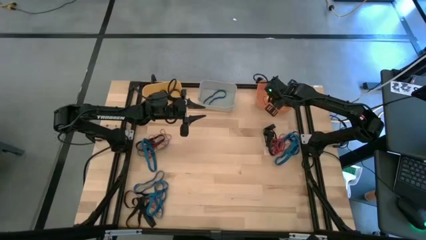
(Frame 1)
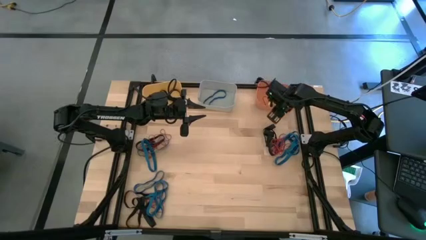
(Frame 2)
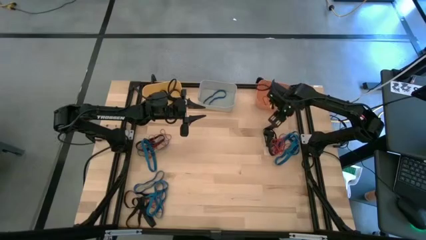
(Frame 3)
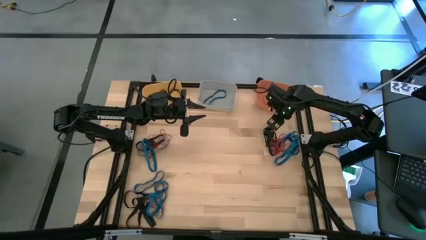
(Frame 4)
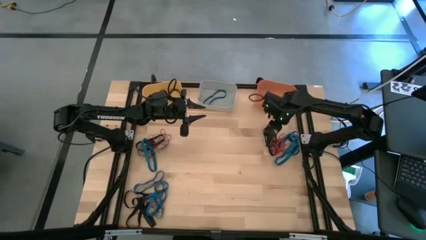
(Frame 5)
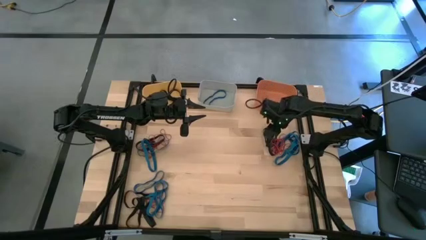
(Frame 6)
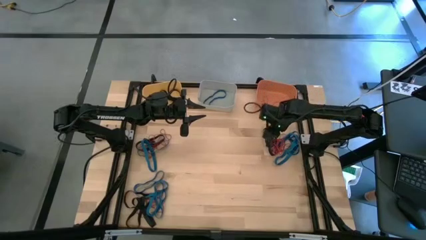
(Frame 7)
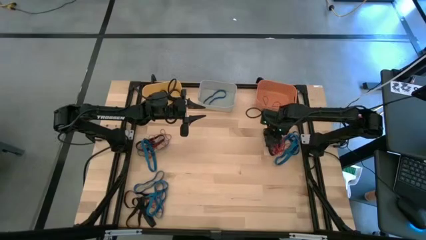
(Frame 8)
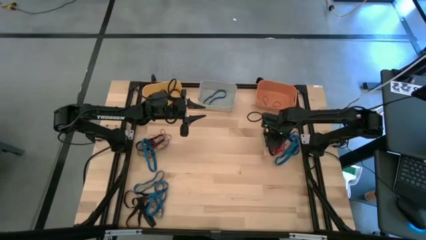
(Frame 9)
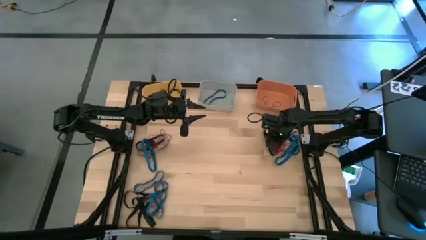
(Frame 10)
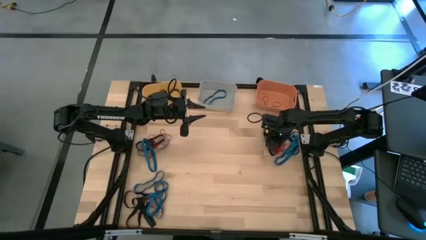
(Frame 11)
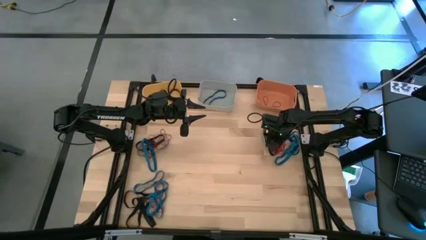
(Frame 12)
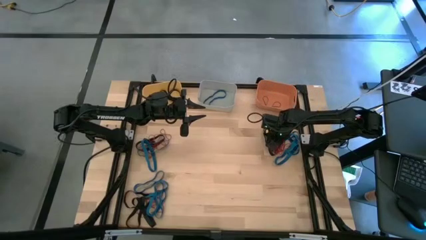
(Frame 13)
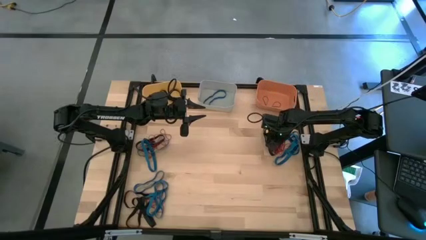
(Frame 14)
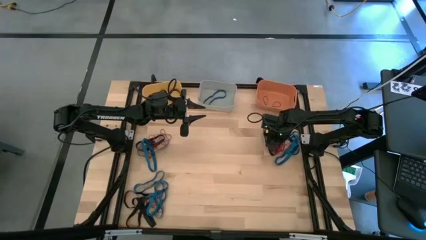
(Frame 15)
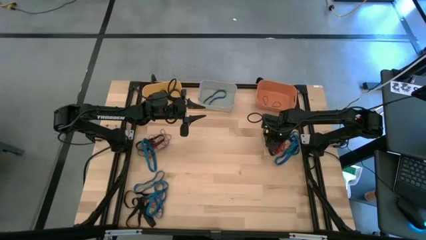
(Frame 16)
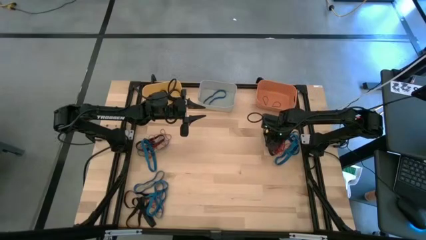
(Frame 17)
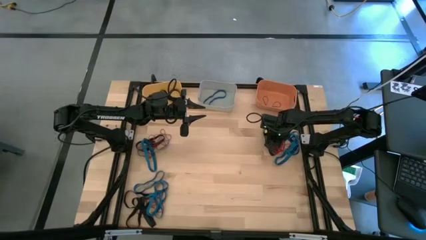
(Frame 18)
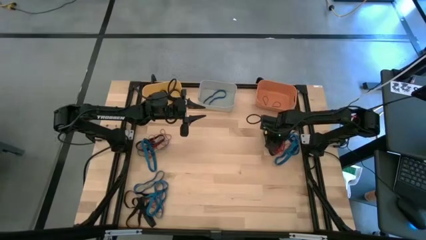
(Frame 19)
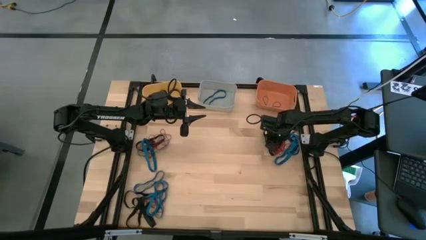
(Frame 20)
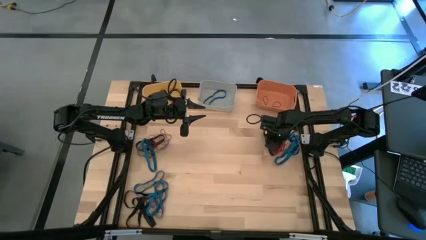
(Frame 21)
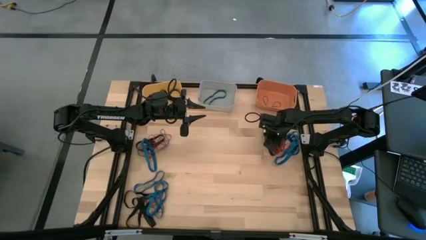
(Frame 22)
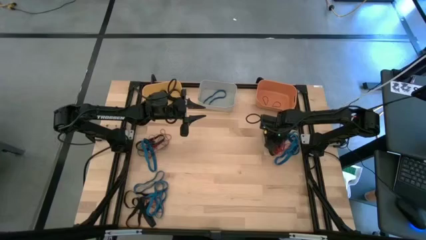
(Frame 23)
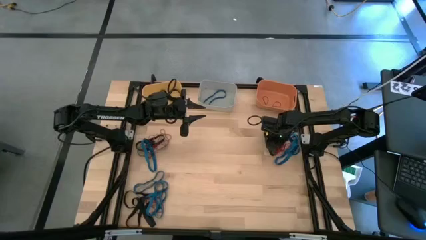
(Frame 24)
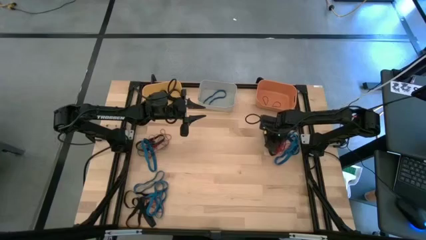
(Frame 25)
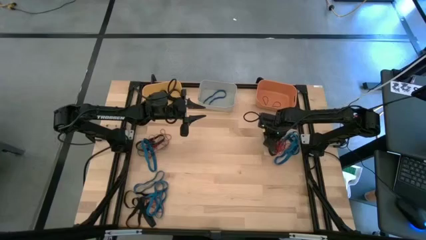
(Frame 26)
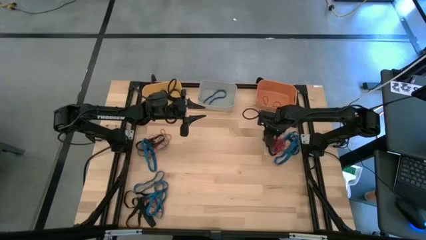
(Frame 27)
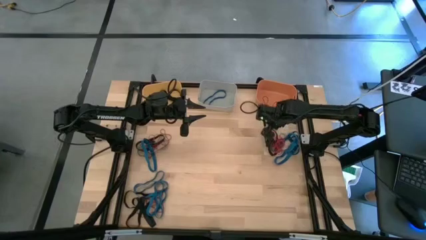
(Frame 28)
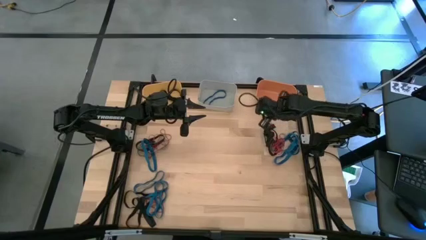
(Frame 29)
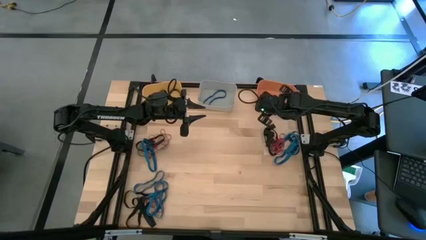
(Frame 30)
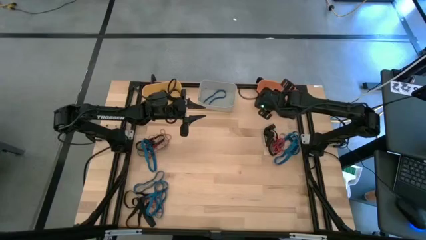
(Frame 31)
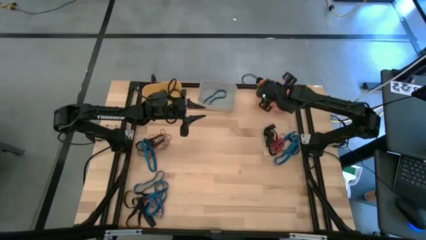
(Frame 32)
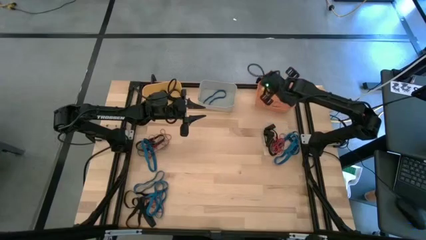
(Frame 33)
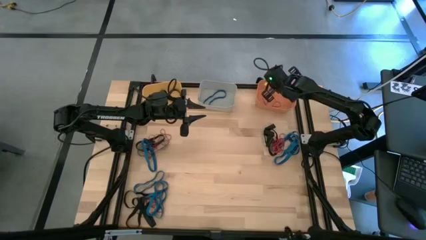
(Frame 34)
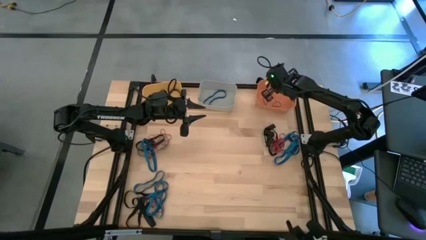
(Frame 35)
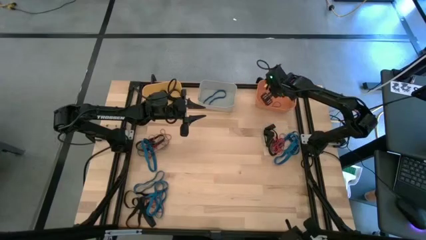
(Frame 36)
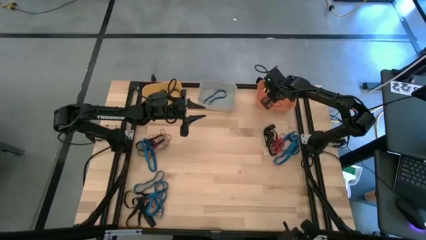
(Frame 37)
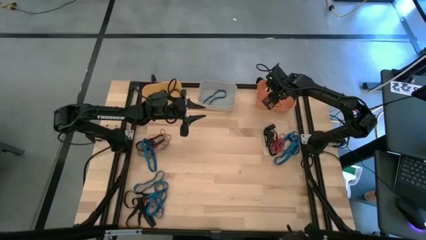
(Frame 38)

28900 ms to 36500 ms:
Task: Sort rubber bands into baskets
Put the red rubber band into the orange bin

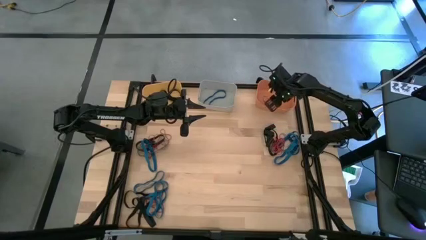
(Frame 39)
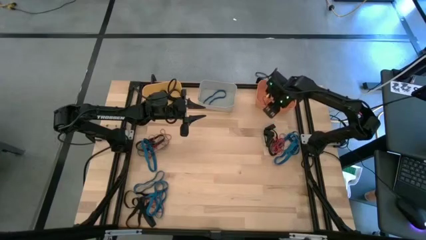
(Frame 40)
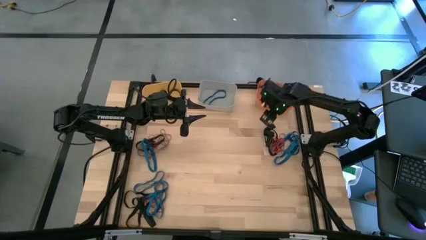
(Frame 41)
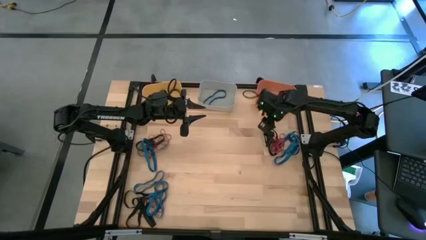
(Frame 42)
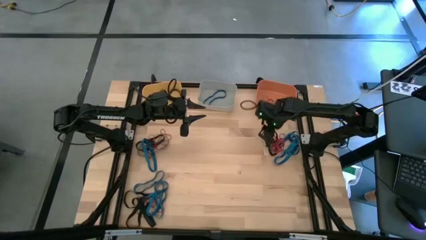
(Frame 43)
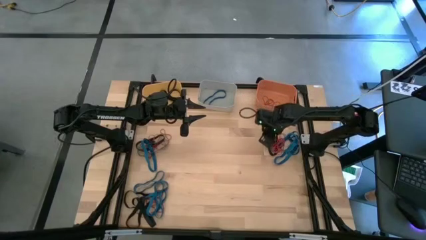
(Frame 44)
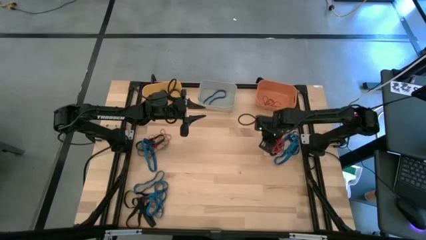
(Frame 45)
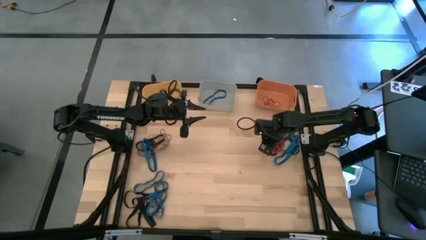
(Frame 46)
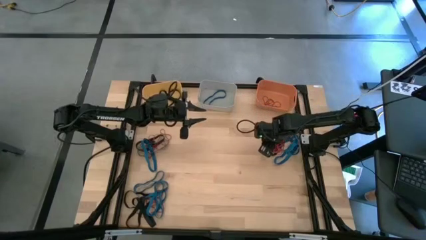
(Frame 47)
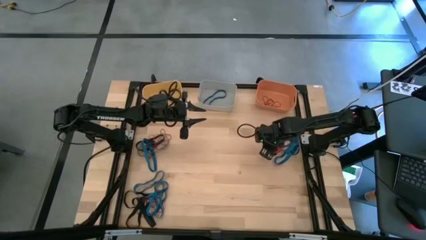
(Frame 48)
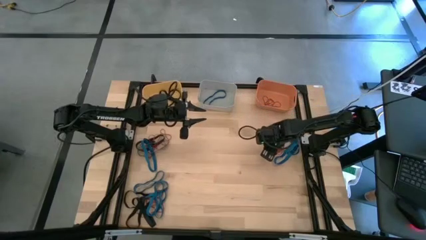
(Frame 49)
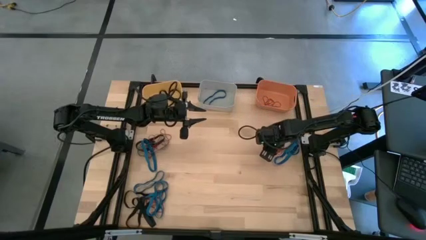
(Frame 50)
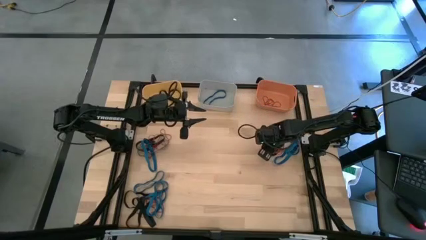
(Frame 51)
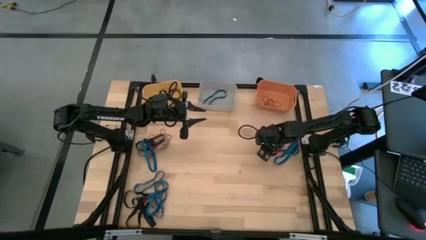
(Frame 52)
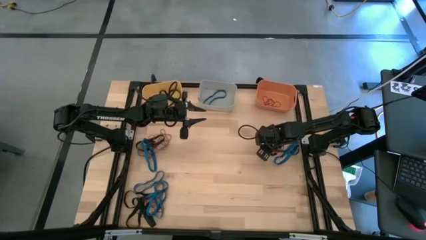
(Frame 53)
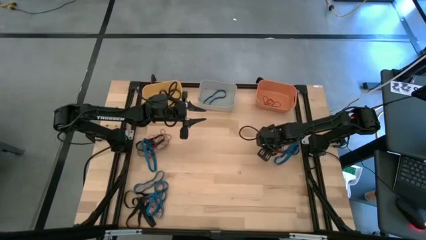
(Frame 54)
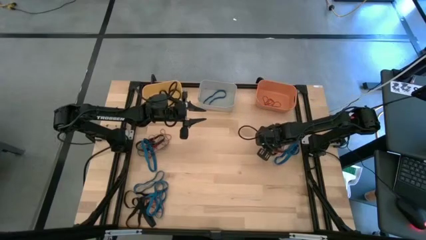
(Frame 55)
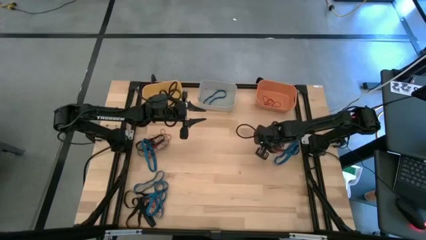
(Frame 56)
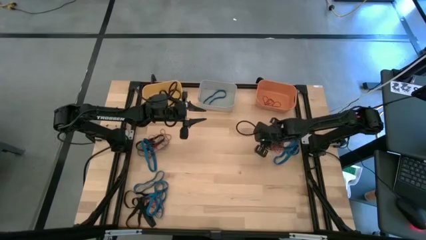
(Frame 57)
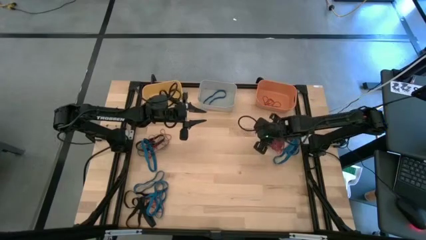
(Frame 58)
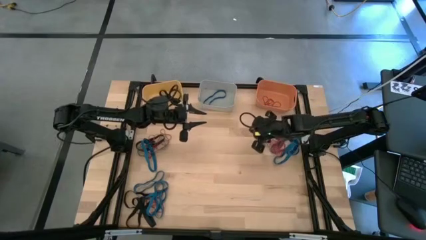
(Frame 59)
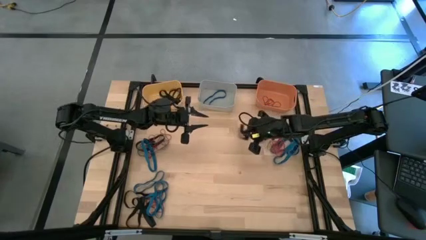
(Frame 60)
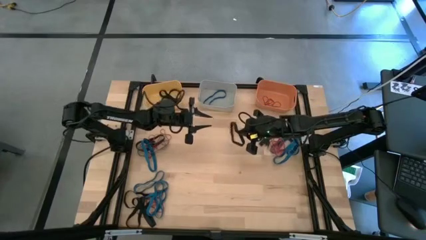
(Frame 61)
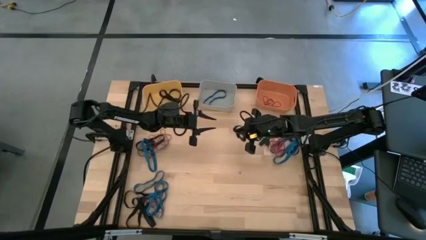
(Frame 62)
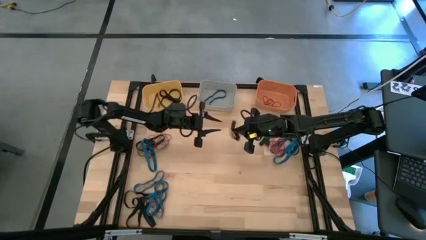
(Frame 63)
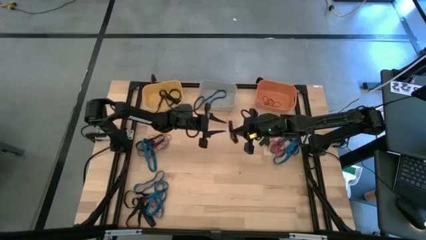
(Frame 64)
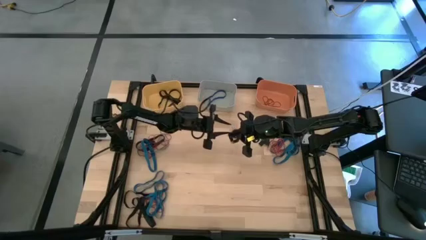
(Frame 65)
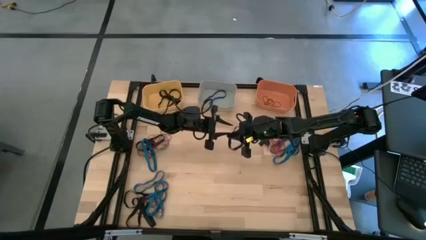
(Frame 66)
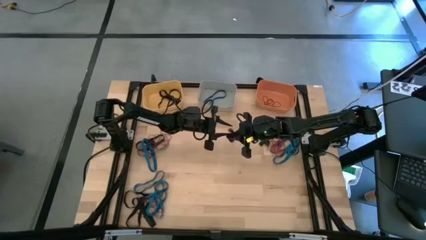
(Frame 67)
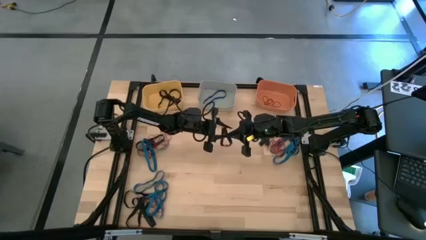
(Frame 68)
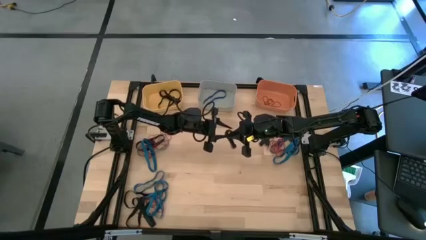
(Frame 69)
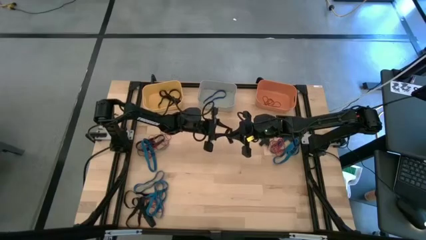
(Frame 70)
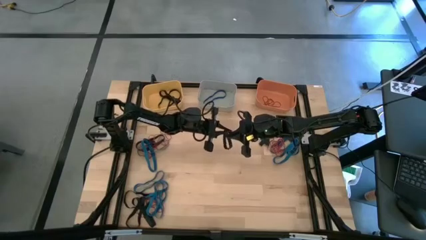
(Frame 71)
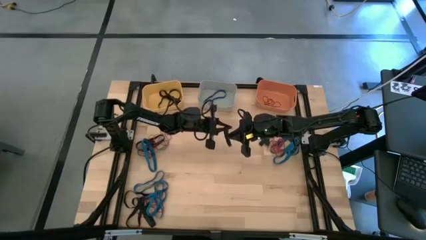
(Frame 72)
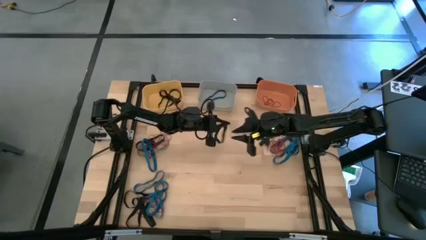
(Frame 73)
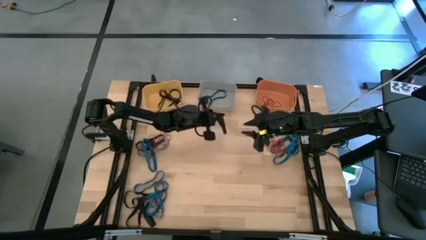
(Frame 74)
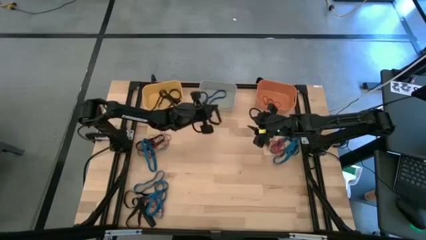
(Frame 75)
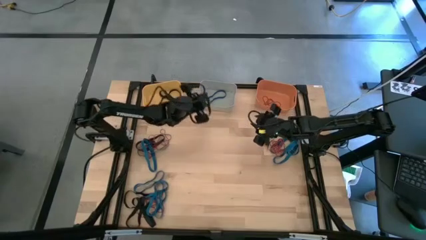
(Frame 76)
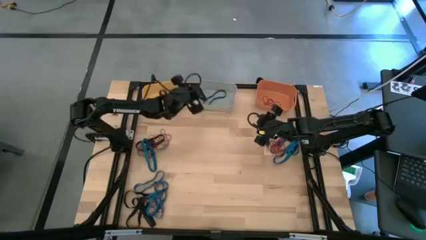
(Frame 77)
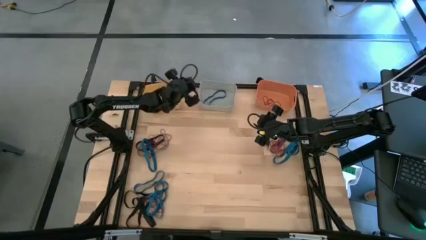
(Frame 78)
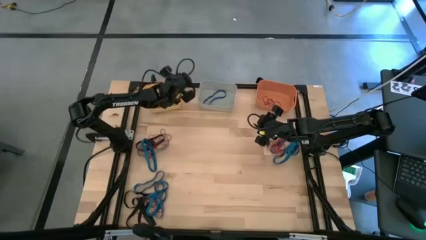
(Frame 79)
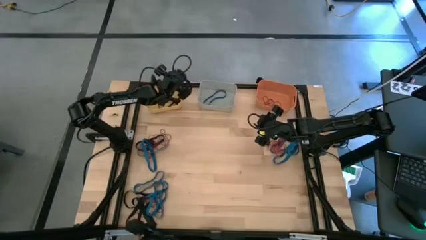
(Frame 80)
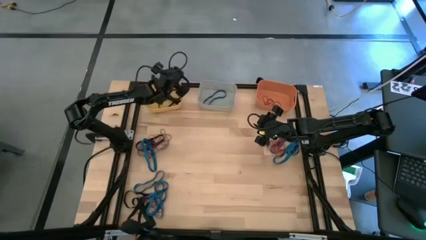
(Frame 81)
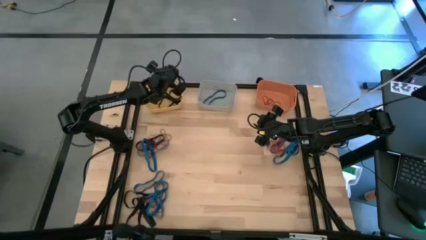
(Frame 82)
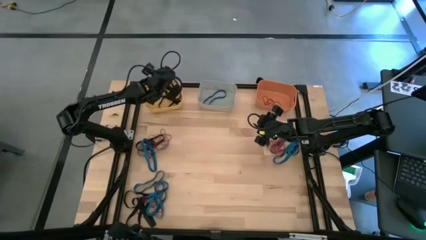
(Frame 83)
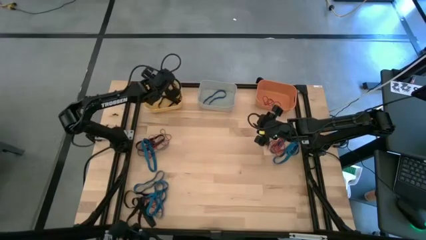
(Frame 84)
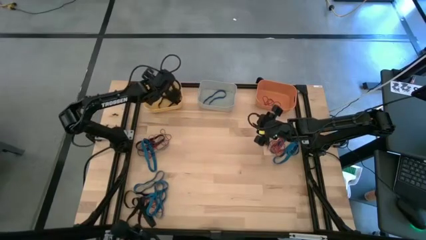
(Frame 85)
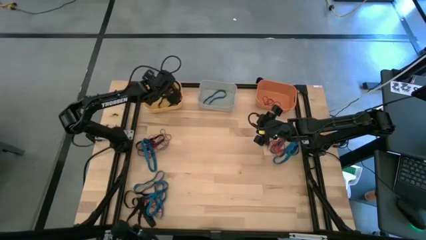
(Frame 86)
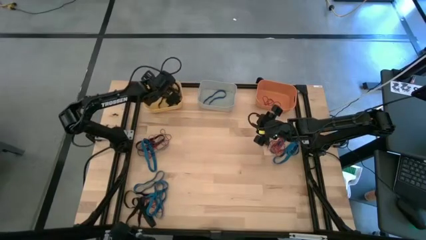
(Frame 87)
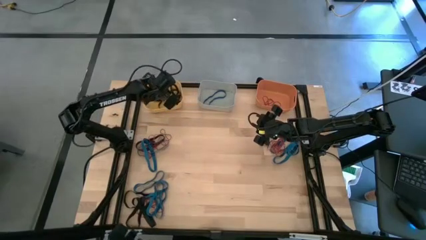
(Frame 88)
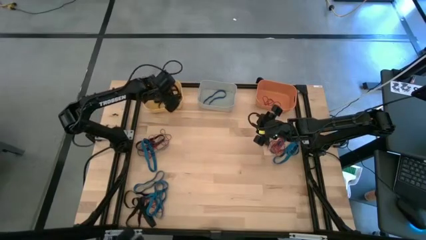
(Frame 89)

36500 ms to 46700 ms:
Put the black rubber band into the yellow bin
